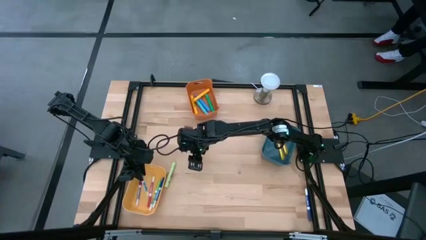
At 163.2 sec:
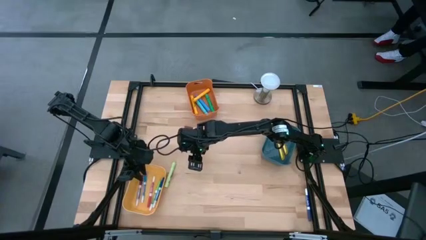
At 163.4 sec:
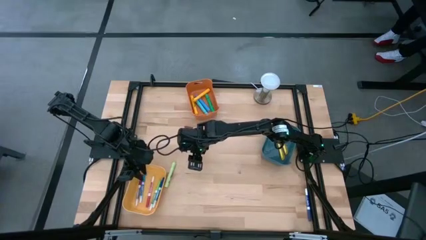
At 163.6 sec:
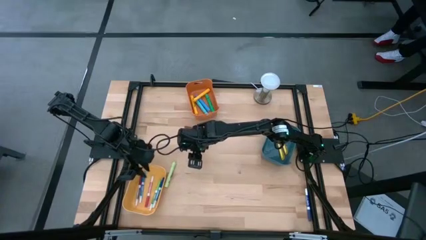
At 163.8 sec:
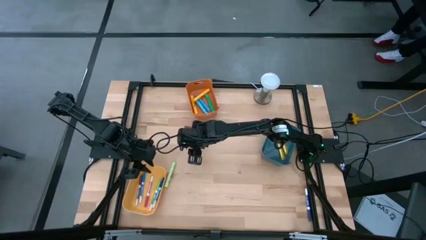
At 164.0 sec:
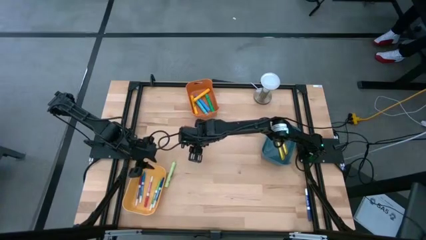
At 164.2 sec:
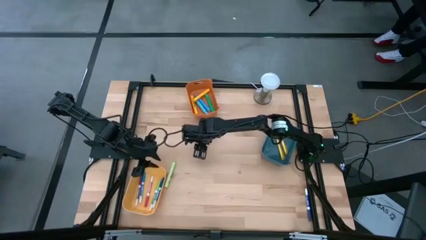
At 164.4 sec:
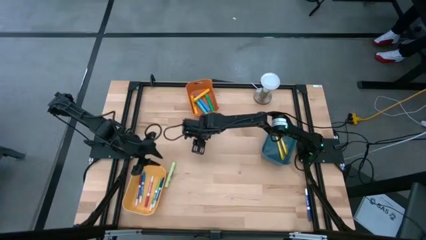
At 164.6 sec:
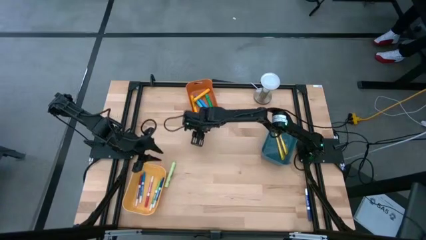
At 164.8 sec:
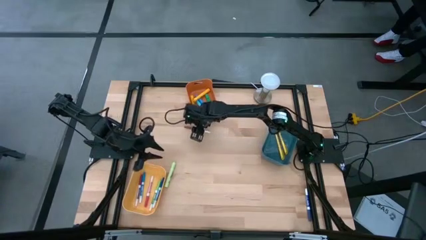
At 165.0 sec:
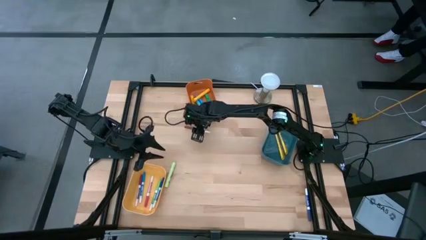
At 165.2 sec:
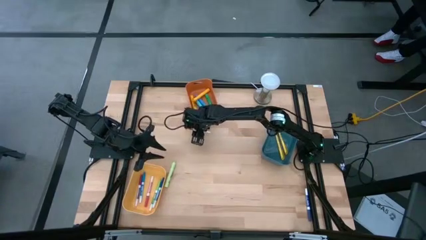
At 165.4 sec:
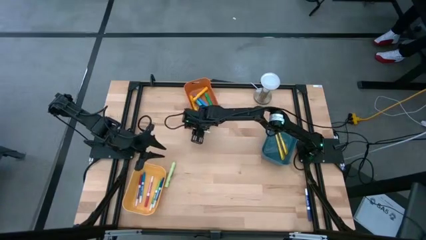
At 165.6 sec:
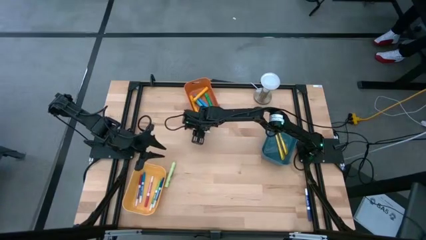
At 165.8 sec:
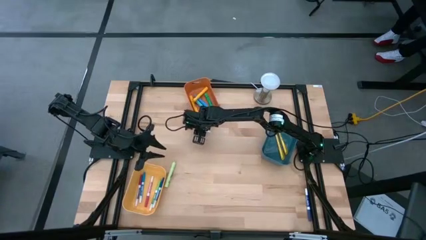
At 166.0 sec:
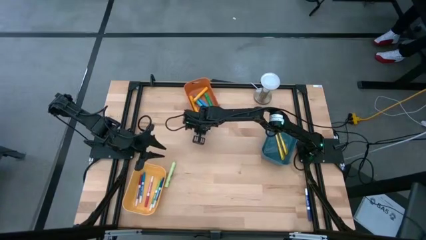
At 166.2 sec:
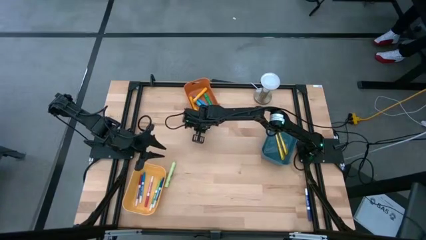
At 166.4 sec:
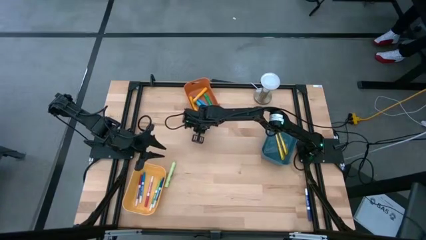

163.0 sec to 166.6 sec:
Task: Pick & Place Markers
Put the brown marker pen into the yellow bin

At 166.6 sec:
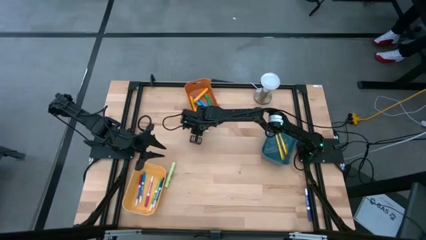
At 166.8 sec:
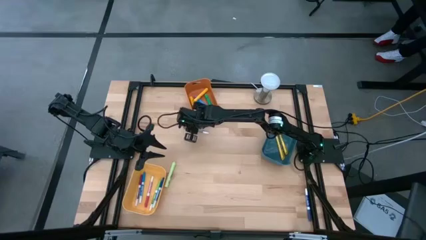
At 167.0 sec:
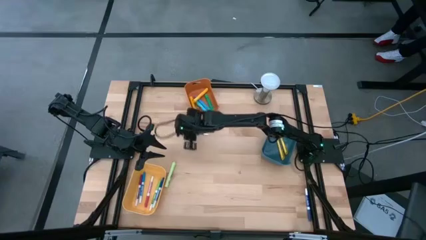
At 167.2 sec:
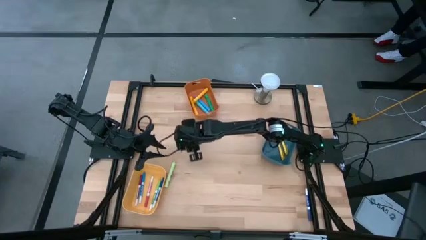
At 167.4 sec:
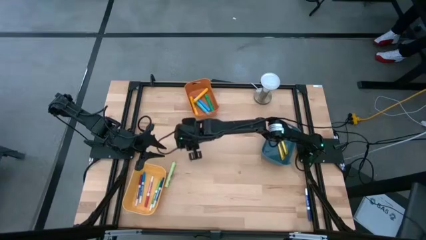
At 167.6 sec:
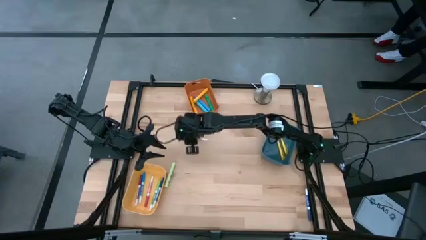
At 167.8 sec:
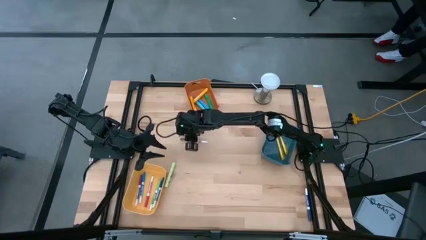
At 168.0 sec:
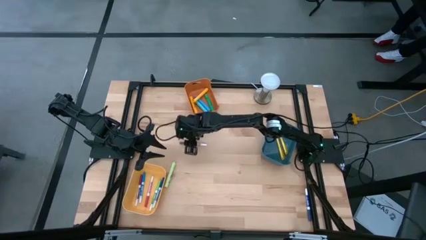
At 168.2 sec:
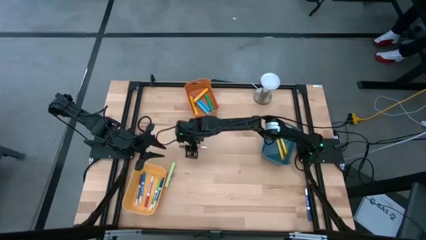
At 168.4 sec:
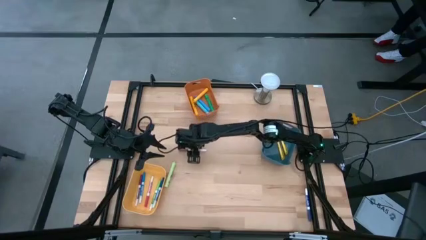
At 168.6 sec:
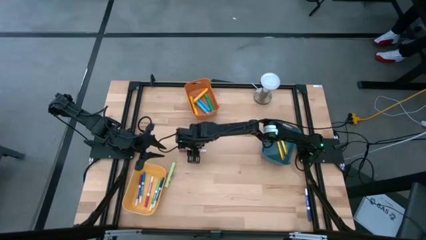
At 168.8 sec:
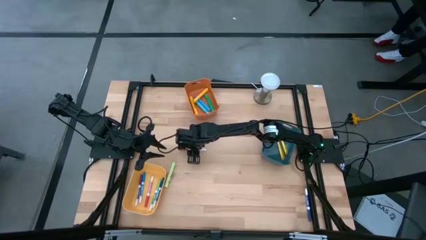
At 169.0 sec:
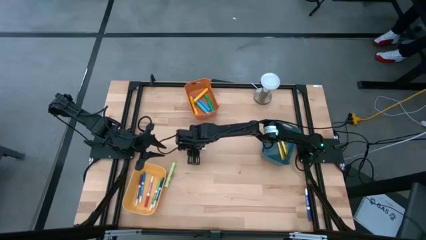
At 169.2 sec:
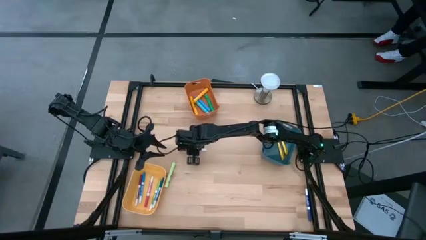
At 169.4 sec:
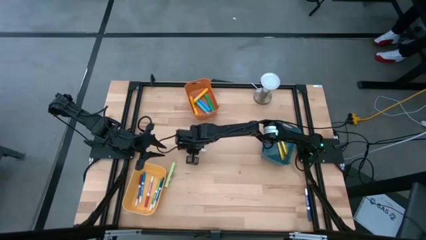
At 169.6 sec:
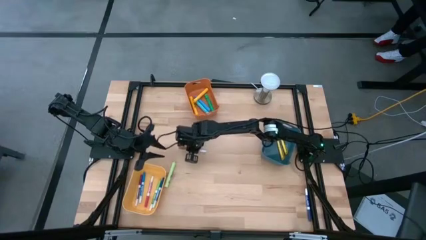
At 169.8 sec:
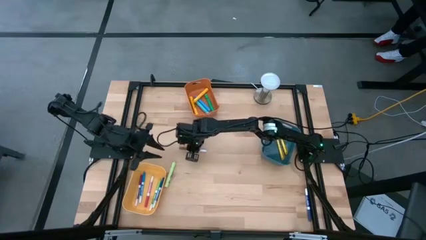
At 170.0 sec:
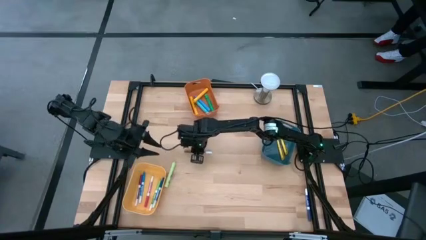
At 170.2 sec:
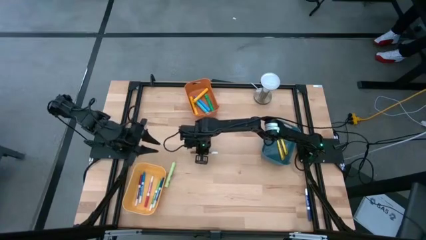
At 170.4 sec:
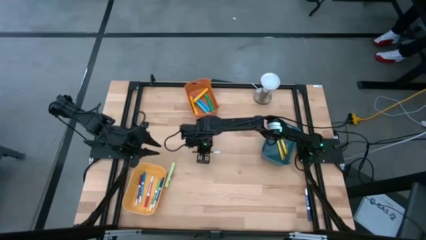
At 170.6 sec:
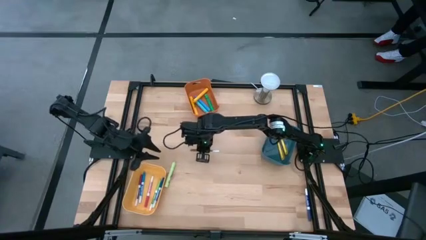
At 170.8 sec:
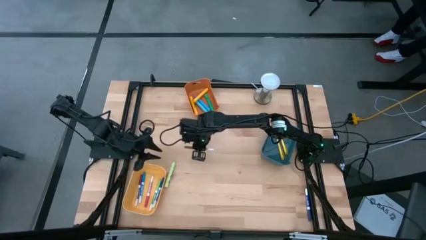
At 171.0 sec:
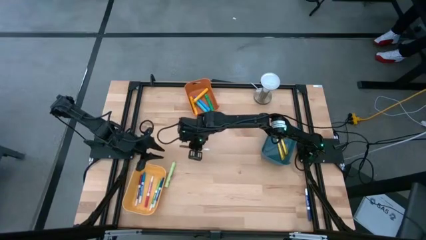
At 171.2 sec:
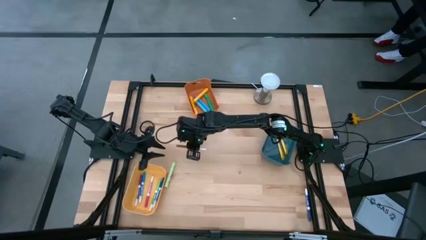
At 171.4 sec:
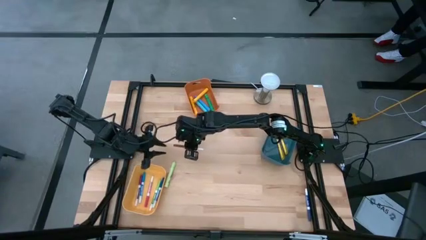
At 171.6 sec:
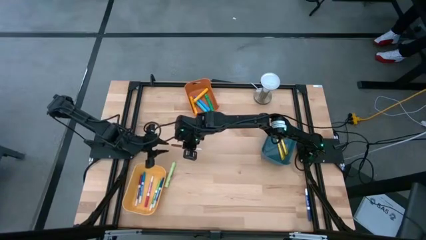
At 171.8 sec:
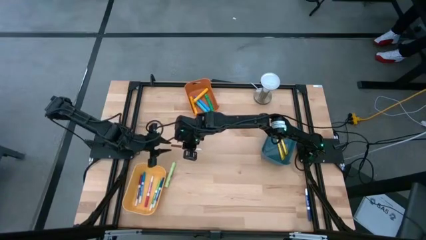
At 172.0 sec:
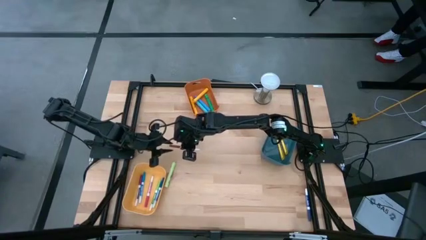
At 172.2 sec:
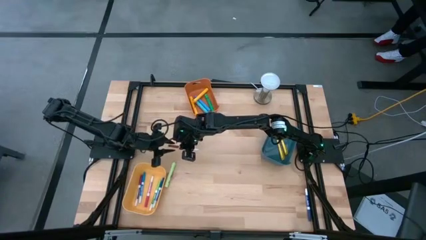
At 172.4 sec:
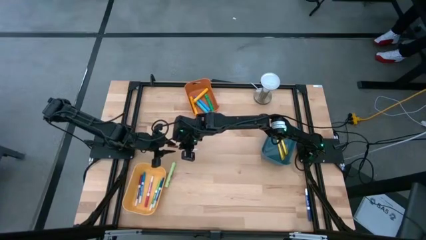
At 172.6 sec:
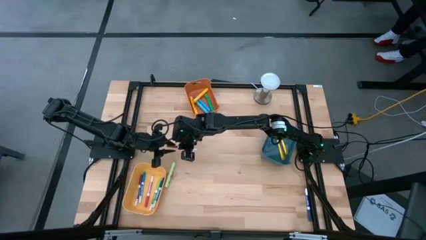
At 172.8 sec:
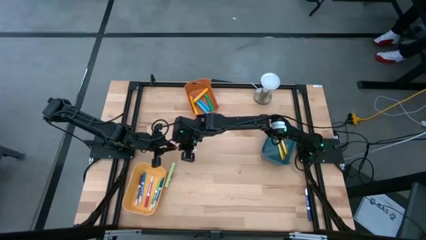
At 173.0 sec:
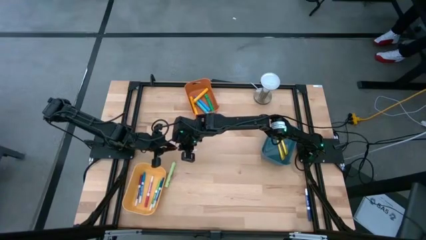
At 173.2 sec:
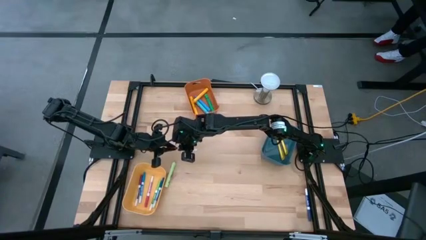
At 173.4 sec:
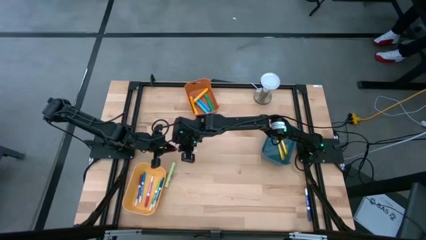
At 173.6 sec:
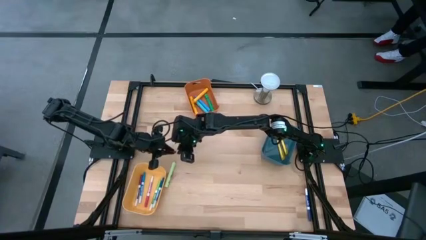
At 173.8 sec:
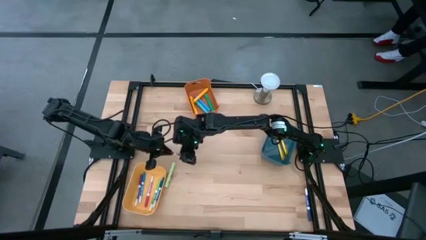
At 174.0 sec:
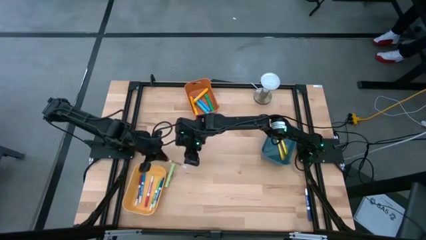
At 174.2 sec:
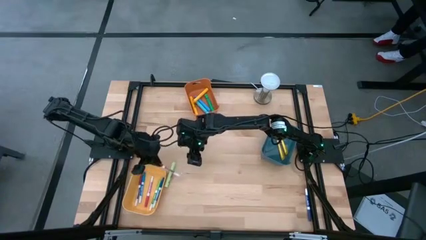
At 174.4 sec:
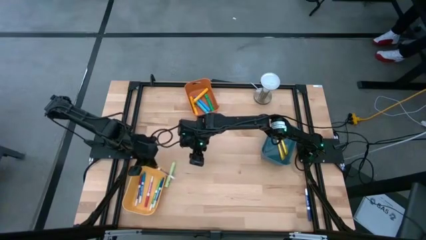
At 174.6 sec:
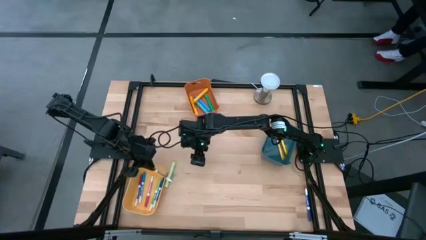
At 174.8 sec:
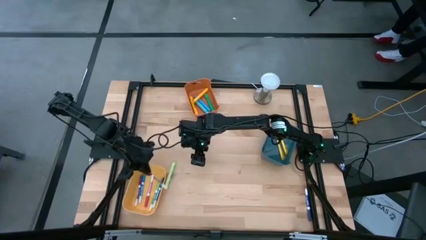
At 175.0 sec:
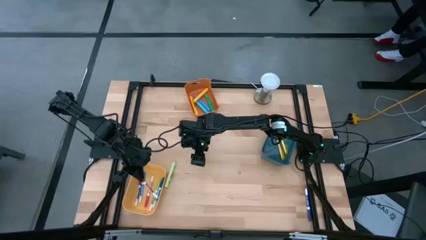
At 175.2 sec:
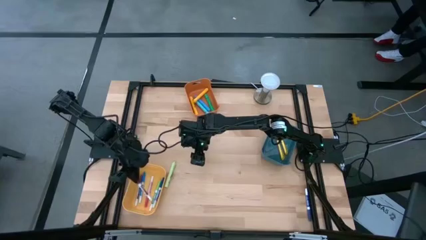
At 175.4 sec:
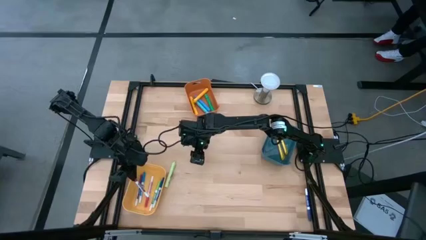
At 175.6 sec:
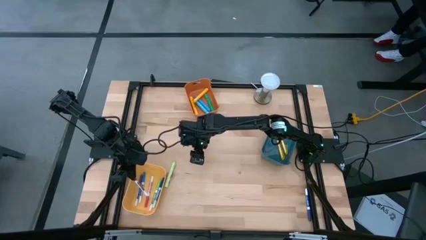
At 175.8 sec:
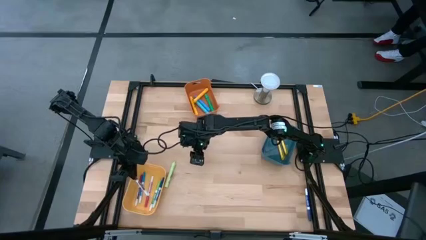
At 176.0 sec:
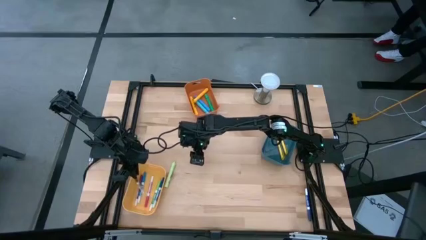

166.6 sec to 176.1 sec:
Put the brown marker pen into the yellow bin

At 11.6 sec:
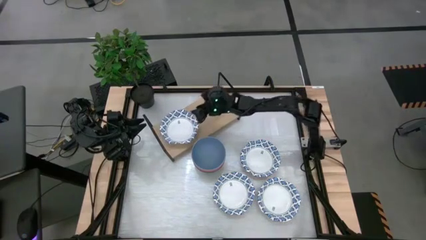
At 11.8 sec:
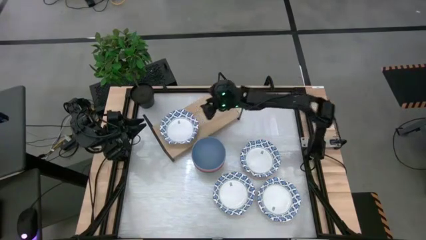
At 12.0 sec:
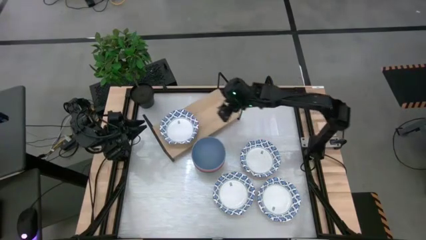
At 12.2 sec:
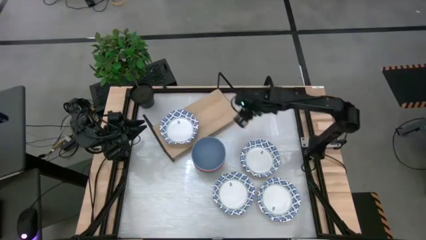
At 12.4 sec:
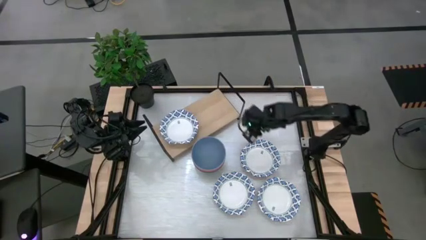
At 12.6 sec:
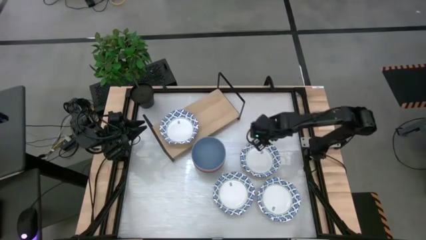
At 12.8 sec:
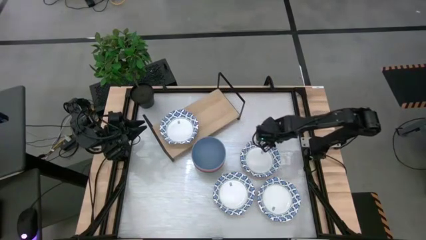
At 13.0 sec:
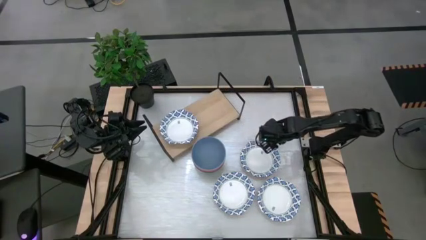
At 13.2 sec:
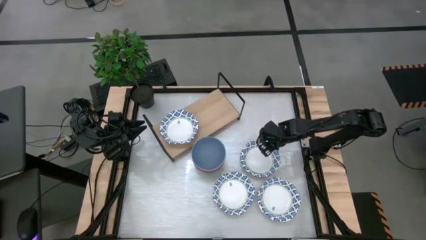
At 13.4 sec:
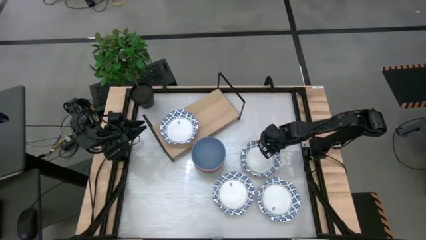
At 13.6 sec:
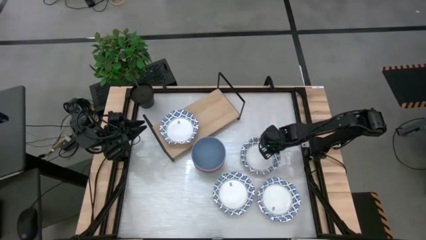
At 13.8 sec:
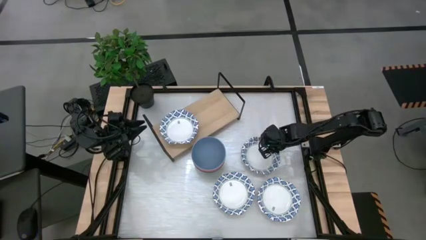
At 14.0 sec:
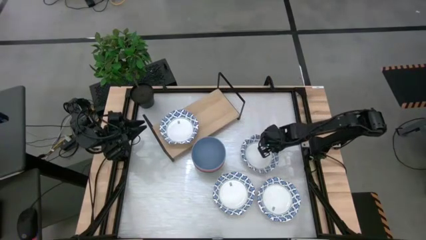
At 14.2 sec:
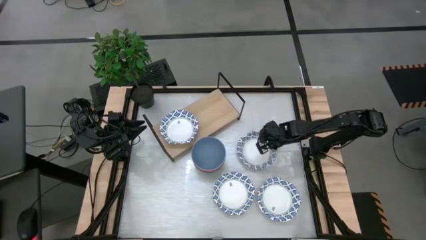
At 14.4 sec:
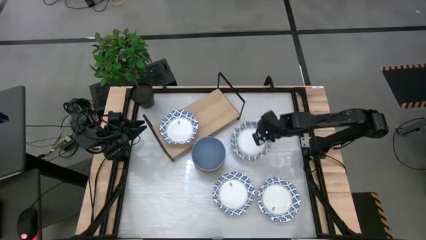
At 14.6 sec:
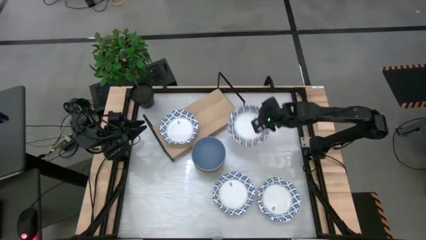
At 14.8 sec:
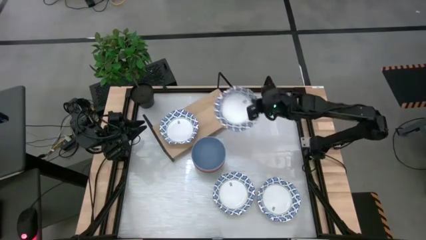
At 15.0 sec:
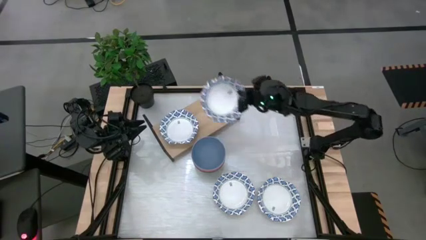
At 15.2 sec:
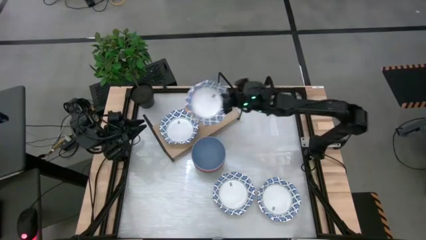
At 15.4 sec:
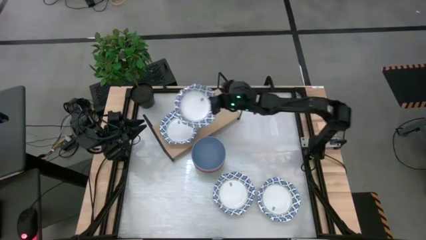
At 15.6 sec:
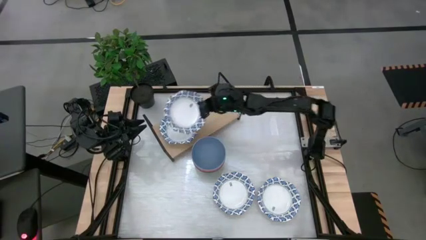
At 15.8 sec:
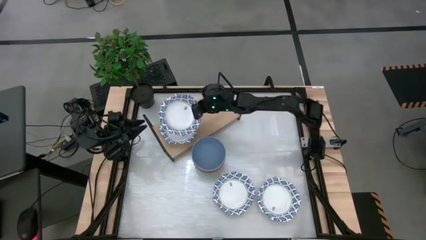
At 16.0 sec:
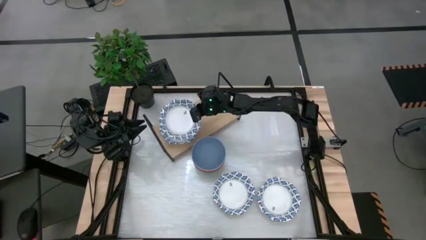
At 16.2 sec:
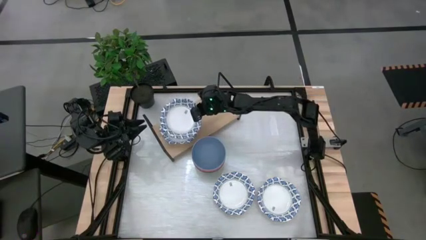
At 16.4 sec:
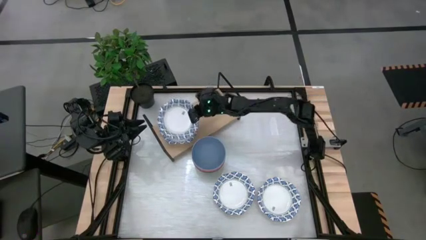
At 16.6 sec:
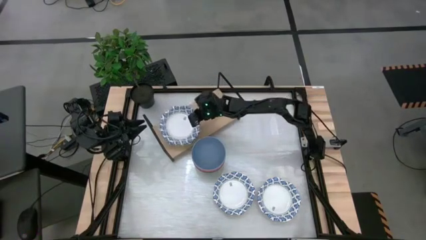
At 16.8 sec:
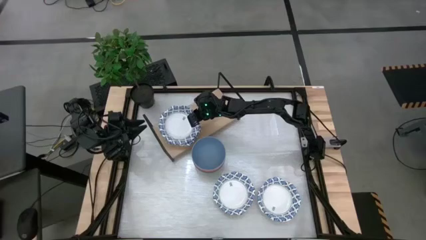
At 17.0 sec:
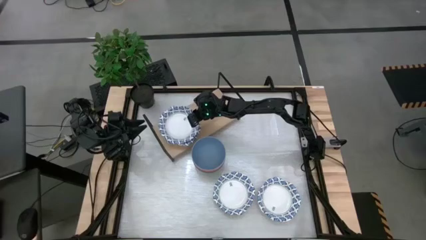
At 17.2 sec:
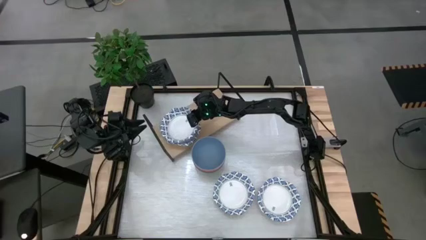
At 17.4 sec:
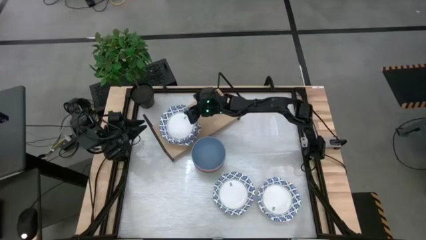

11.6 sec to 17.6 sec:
Task: Place and stack bowls onto a shelf
Stack the white blue patterned bowl on top of the white blue patterned bowl on the shelf
